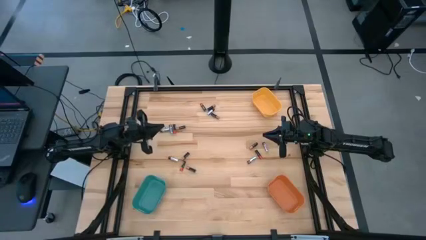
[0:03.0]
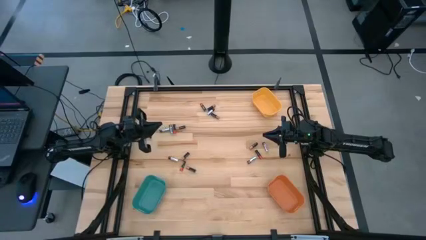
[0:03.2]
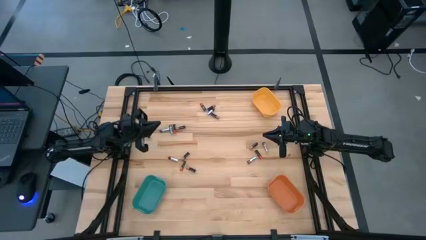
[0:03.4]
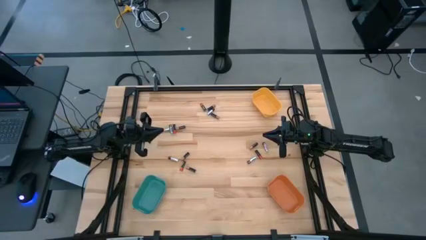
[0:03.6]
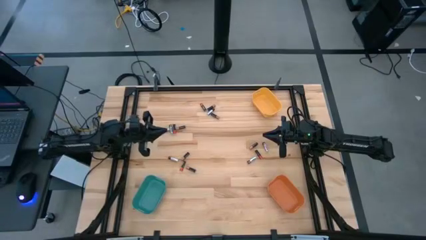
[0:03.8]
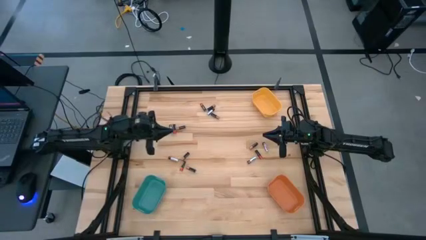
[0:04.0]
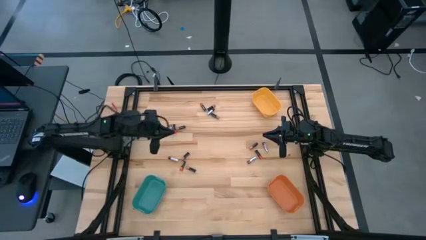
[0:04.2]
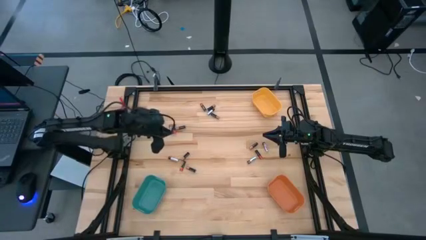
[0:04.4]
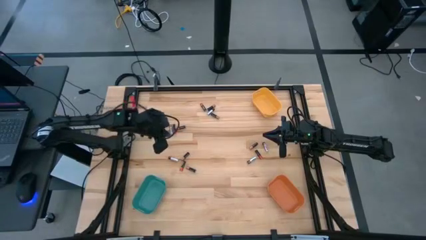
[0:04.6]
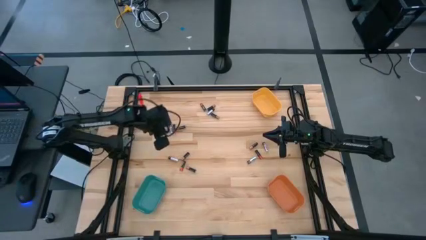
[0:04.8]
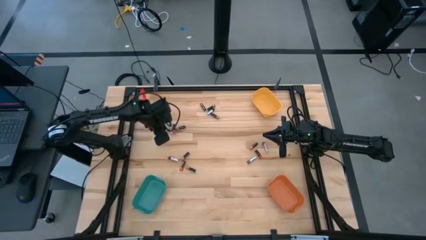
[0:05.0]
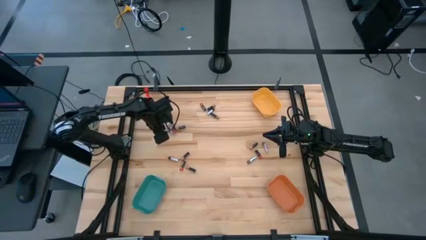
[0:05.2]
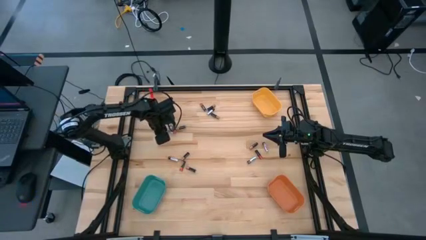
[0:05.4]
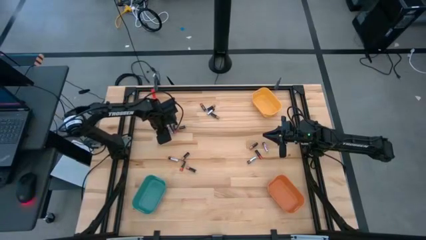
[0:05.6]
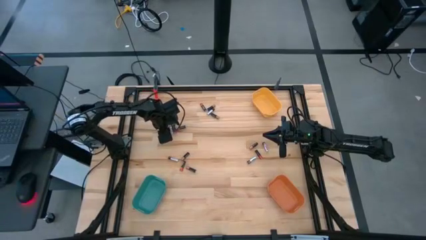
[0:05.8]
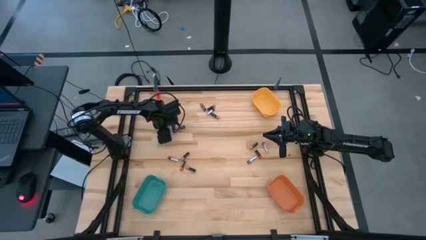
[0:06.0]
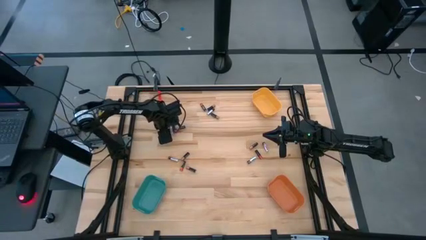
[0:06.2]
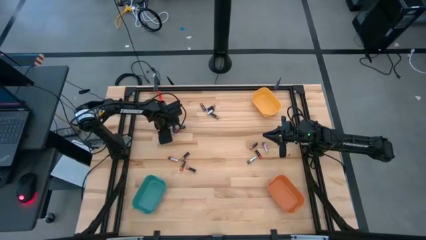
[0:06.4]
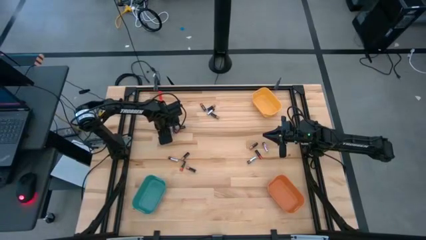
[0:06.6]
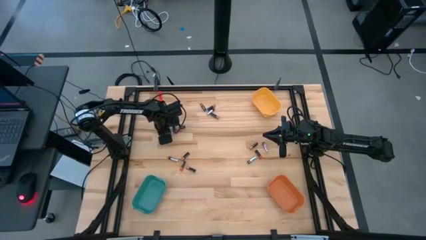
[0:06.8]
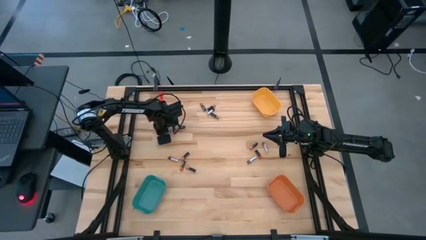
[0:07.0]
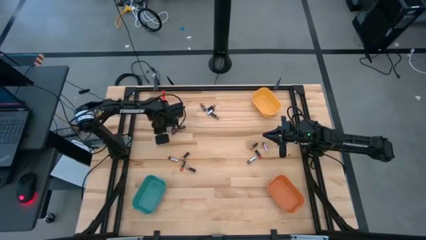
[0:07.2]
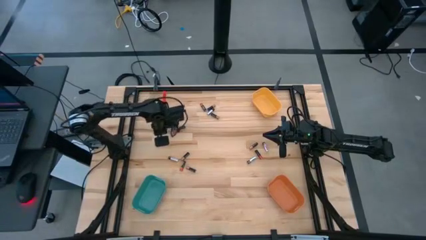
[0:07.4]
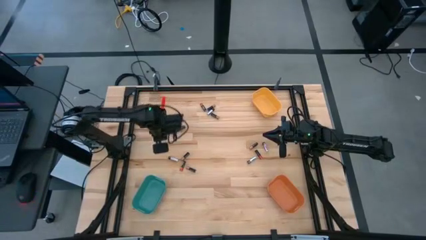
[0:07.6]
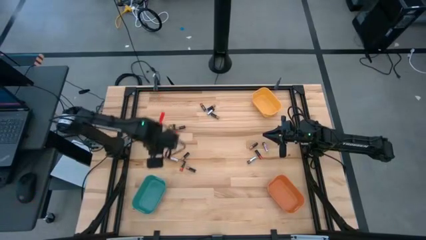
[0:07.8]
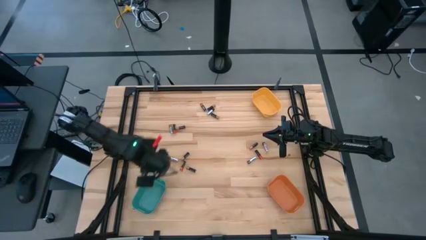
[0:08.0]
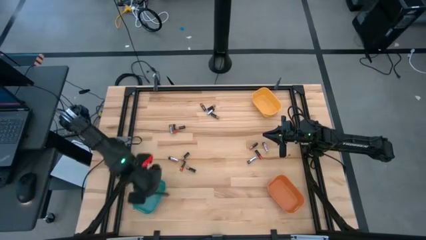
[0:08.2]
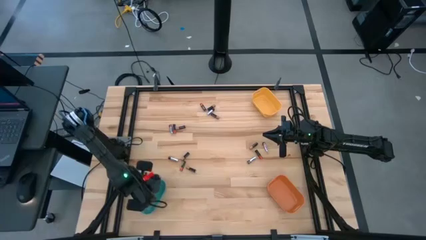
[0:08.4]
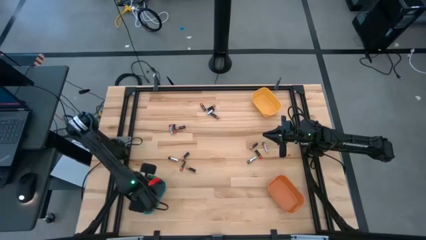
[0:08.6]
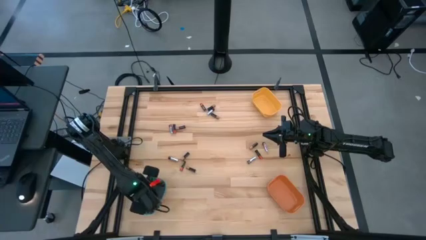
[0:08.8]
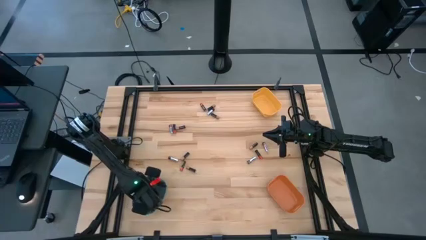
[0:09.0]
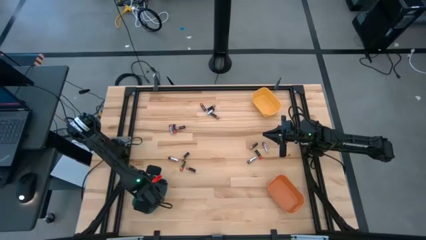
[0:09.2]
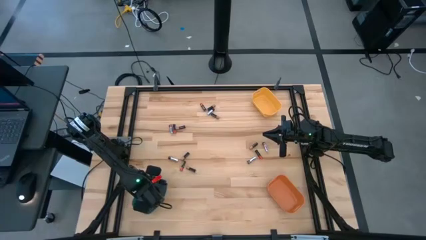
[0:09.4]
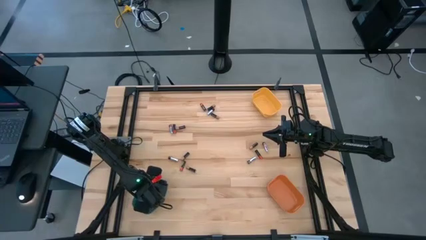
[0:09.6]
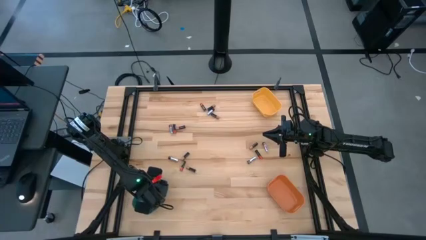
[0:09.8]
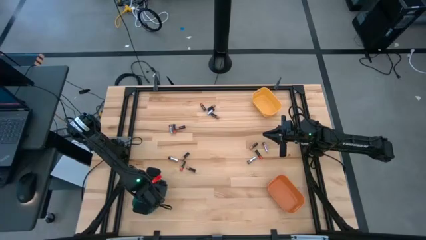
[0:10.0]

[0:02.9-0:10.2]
Task: Sort batteries
Put the silver battery into the green bin

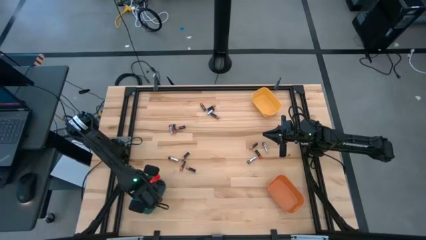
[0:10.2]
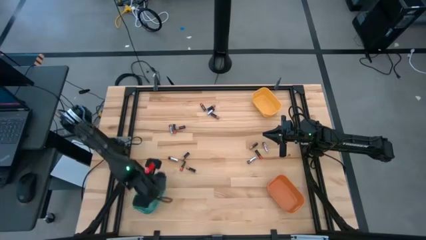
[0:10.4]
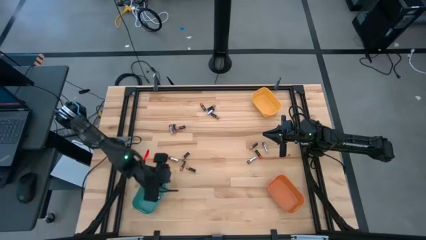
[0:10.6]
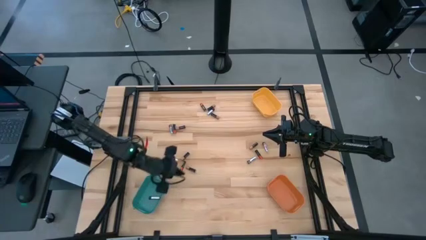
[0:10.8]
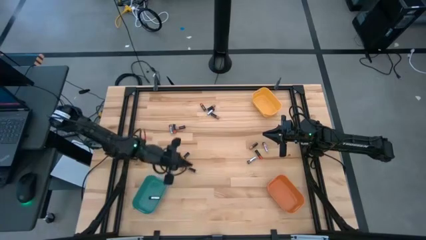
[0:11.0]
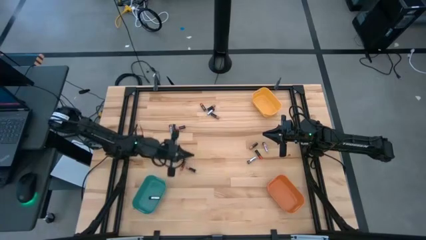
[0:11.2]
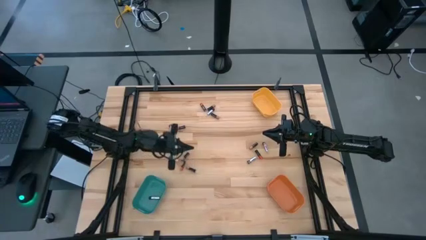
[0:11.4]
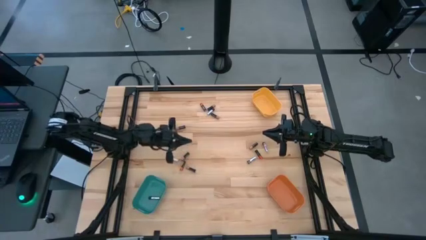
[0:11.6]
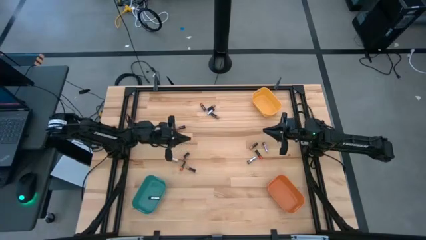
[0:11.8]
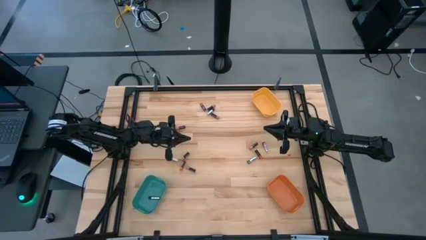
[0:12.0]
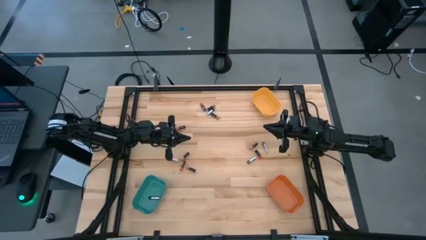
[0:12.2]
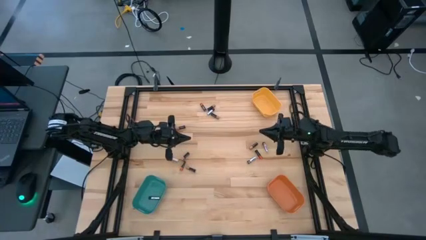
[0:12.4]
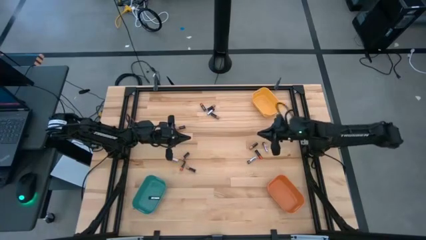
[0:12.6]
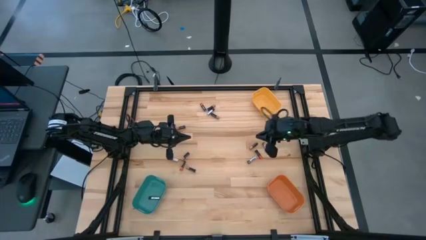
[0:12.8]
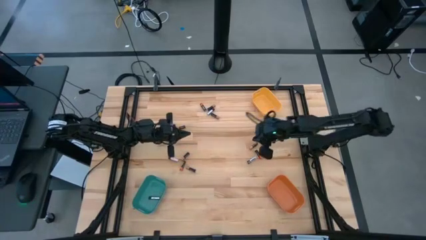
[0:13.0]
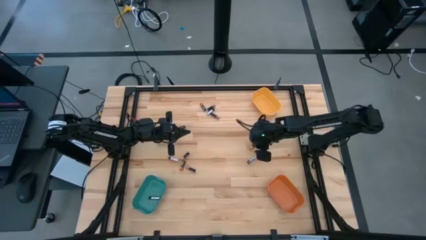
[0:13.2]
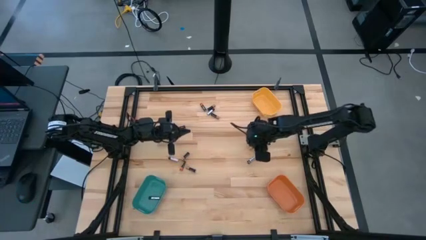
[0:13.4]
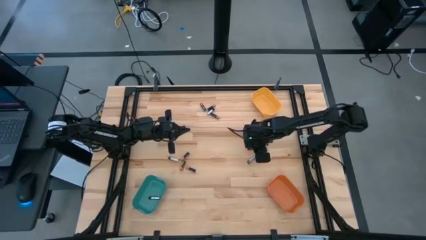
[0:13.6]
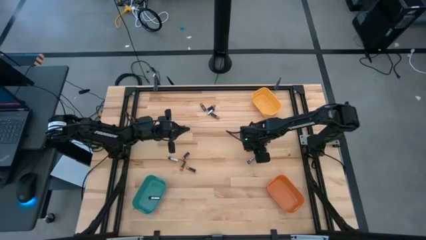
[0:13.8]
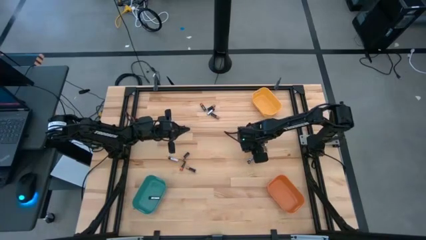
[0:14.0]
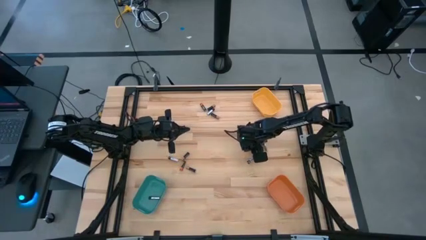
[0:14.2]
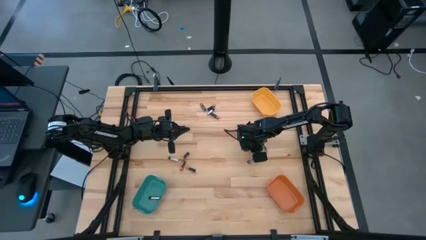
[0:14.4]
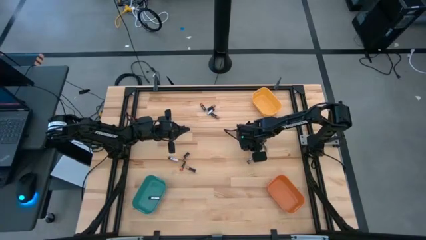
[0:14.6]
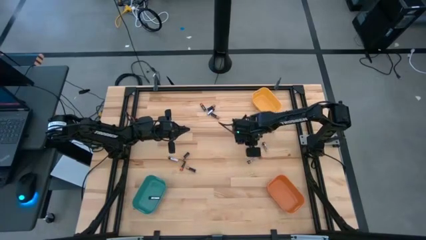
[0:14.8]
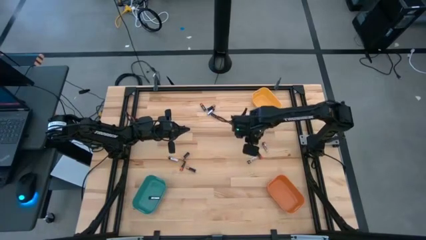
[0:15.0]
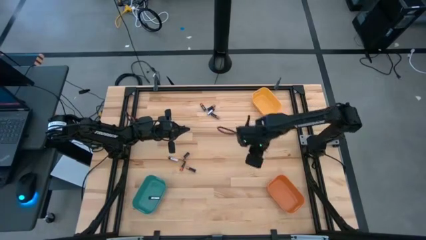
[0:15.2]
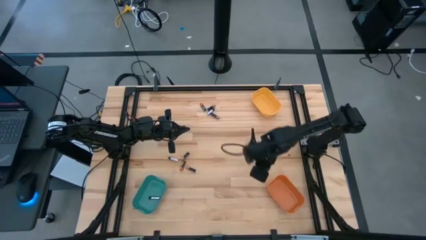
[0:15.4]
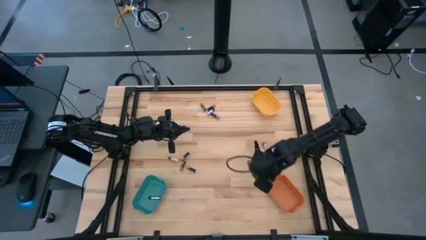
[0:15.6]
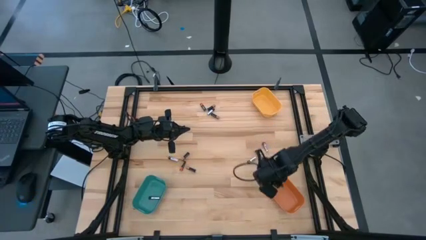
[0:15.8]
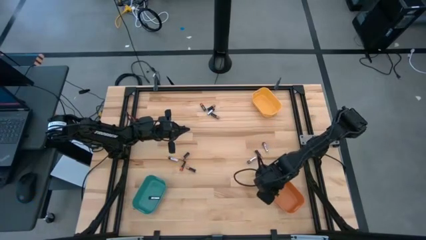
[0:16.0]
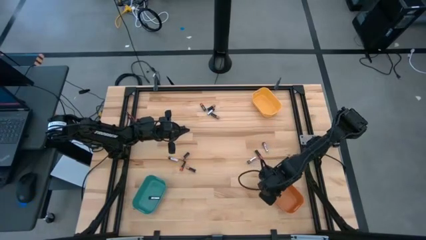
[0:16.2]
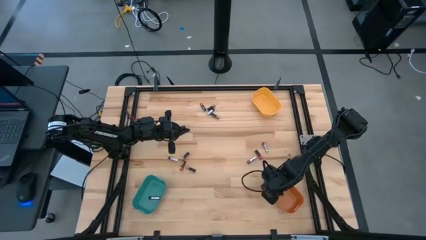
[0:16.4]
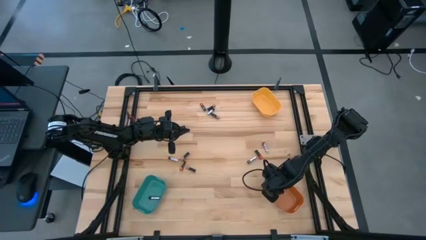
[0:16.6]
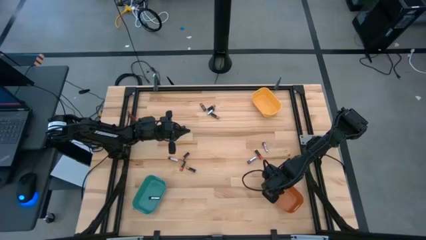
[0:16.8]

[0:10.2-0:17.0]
Put the brown battery into the orange bin
